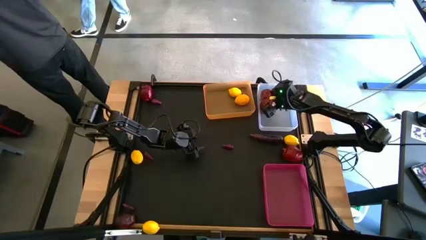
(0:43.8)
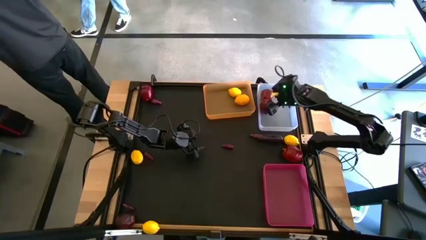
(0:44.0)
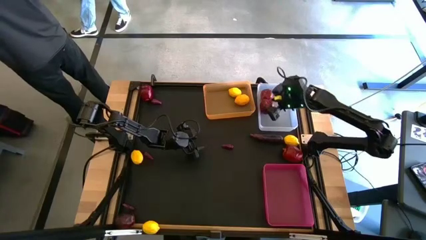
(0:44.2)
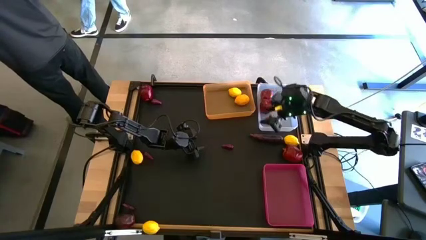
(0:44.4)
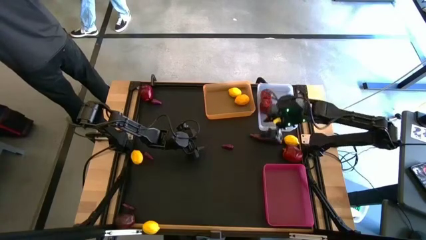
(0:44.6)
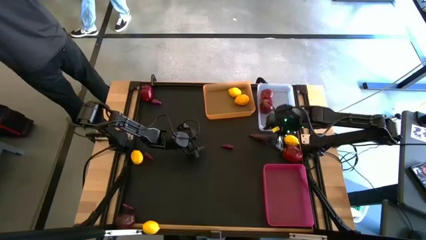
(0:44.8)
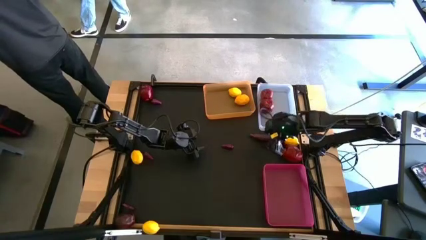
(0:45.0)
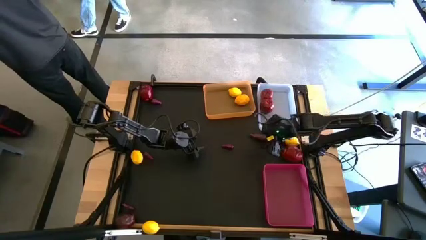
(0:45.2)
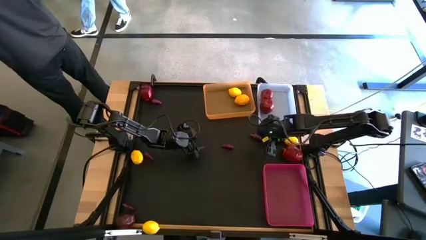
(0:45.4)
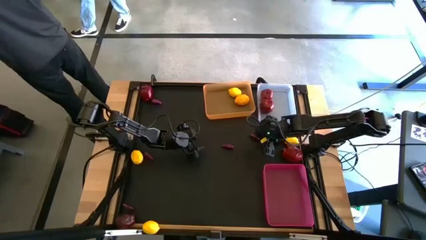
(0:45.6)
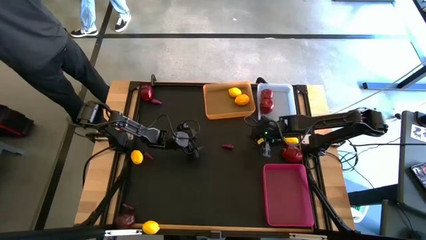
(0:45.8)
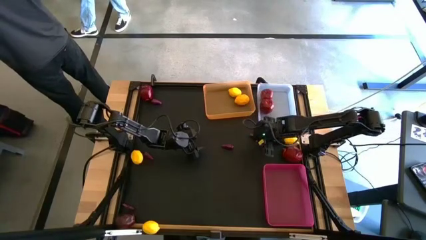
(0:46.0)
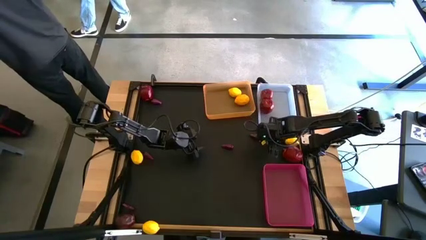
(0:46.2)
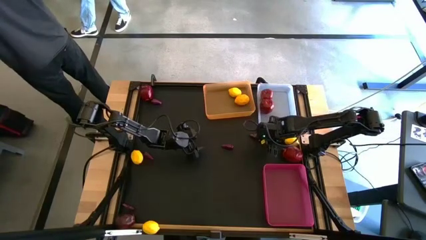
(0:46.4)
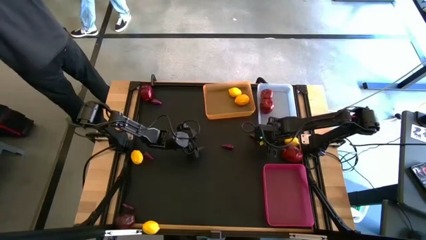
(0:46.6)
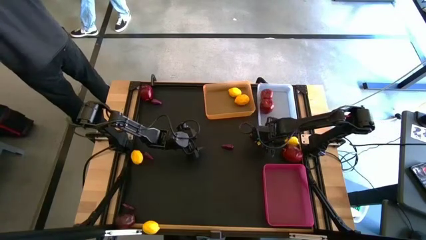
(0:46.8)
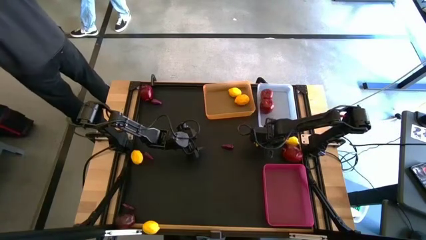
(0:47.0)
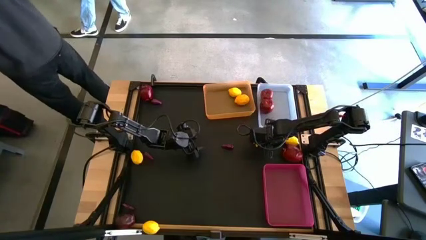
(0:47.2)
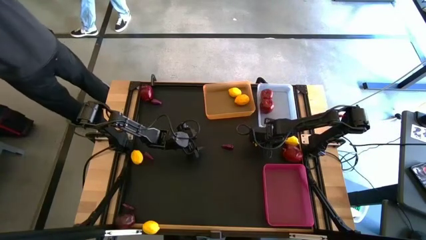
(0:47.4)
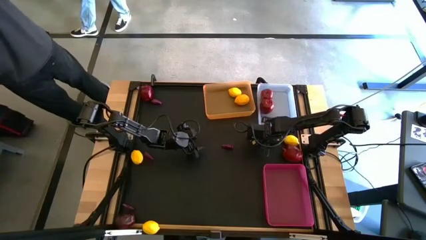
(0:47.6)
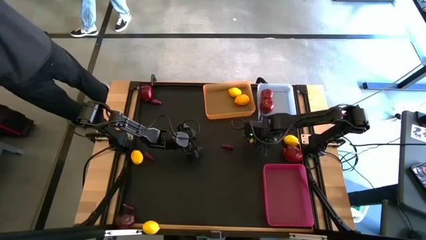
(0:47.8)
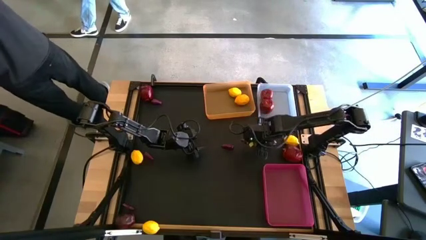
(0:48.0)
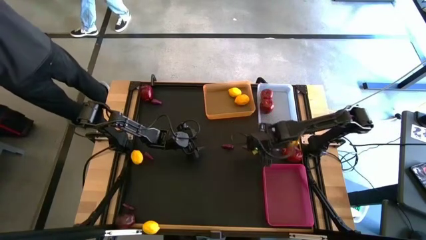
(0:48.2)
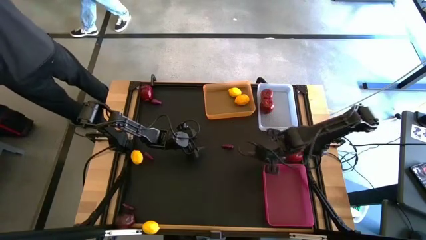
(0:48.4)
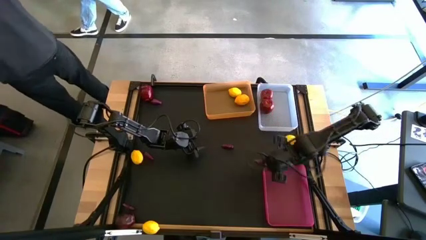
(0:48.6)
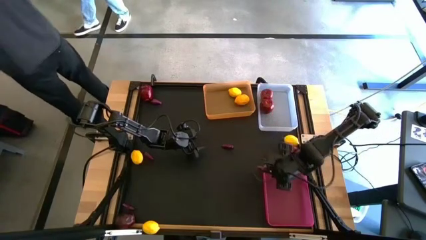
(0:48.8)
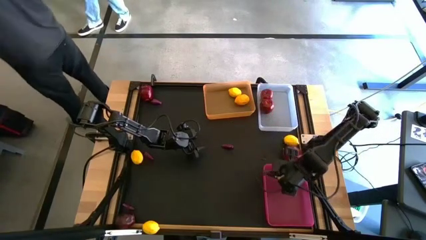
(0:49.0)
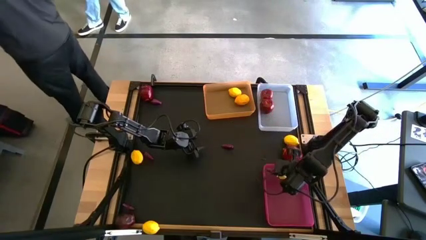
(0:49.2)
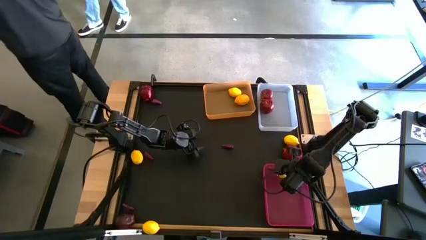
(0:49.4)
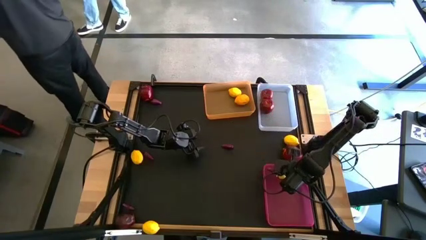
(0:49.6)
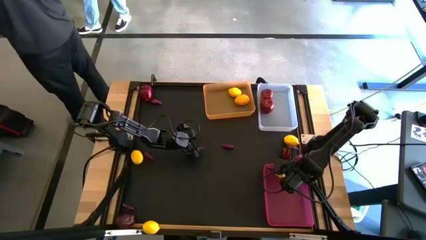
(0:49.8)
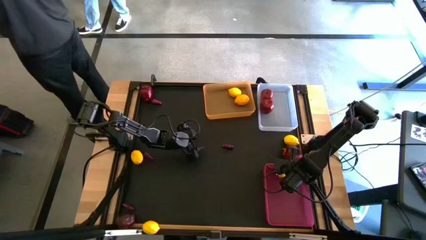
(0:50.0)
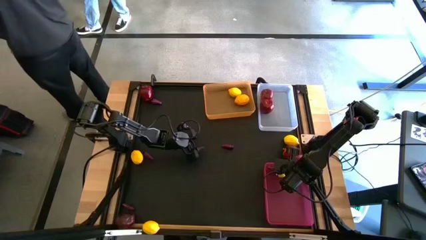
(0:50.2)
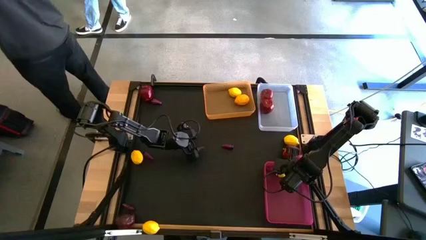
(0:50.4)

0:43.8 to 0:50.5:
Task: Sort produce into baskets
Put the violet eggplant into the pink bin

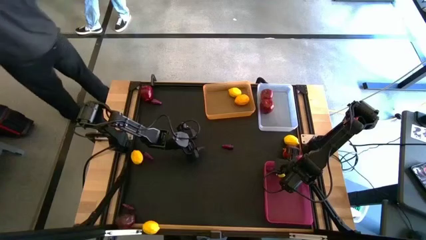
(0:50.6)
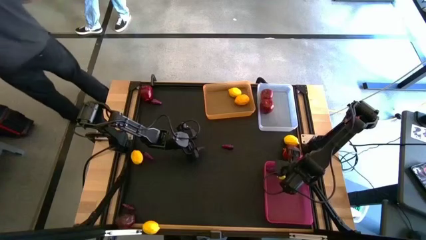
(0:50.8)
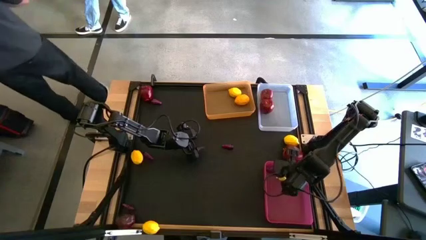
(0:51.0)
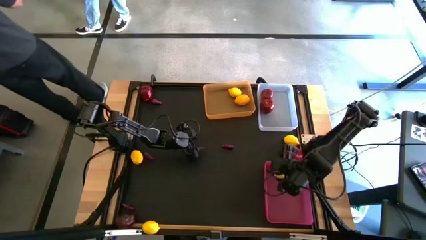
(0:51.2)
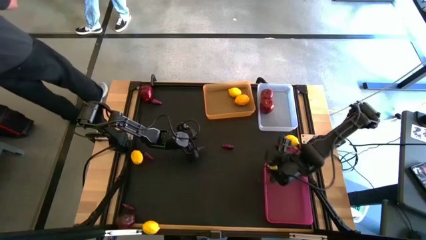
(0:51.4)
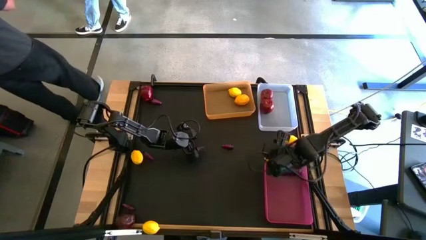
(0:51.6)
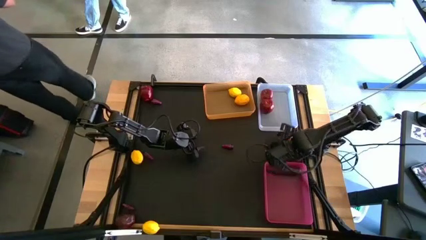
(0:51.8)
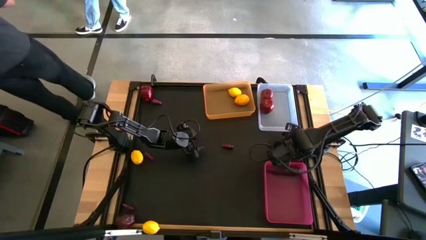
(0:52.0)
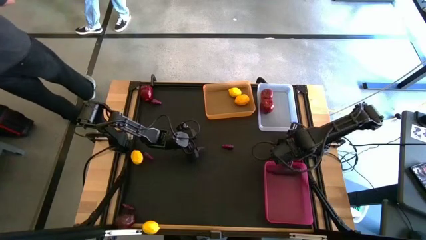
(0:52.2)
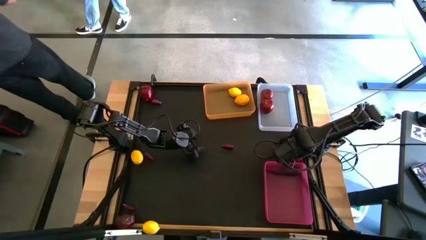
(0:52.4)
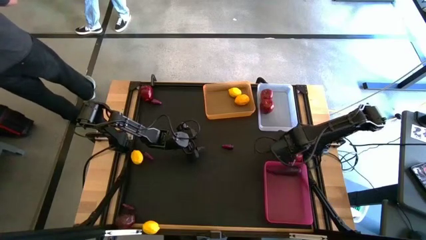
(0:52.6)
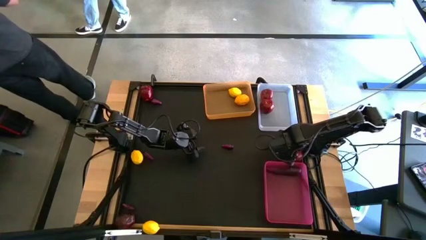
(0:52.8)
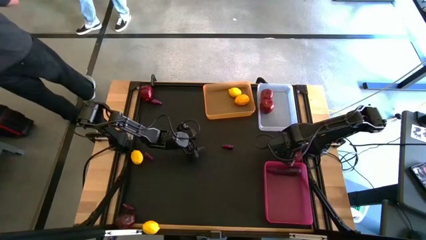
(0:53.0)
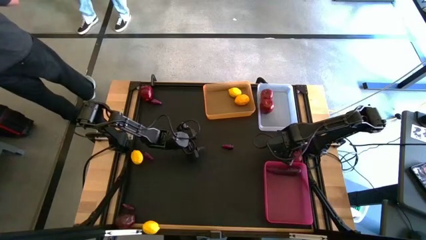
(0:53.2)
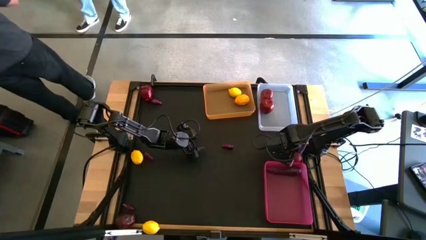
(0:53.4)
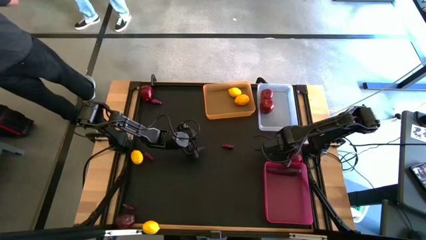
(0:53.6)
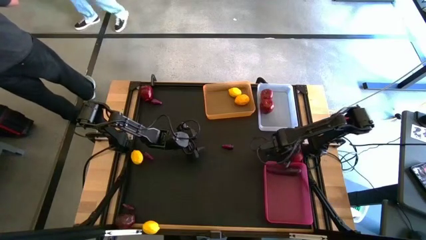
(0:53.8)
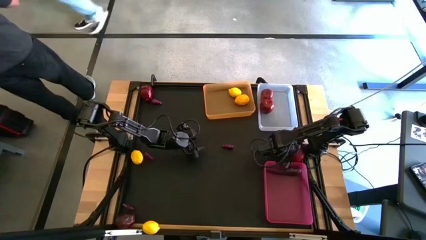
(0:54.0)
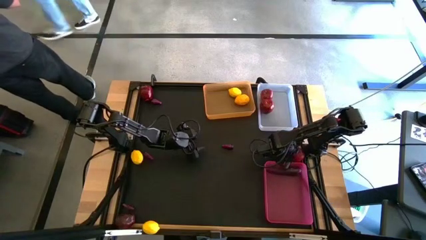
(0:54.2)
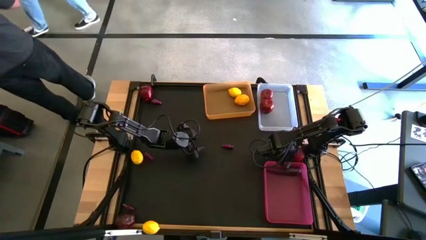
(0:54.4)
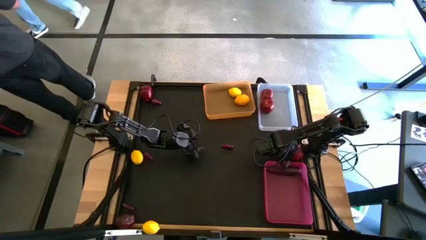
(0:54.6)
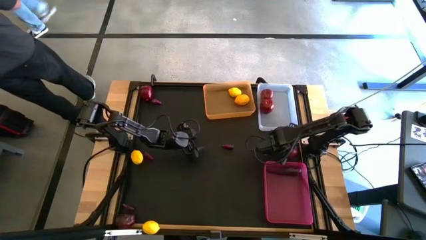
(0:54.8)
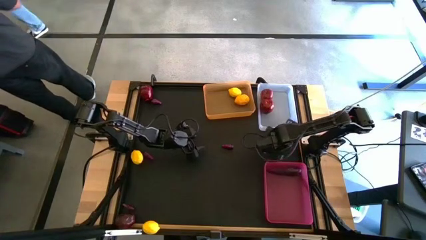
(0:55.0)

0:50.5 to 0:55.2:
Put the red apple into the white bin

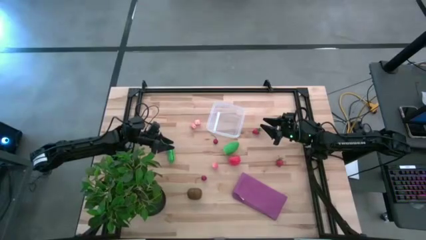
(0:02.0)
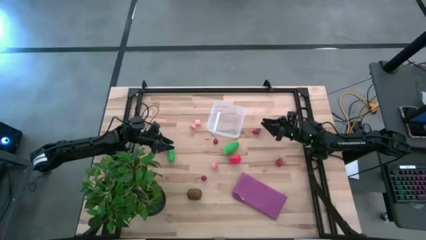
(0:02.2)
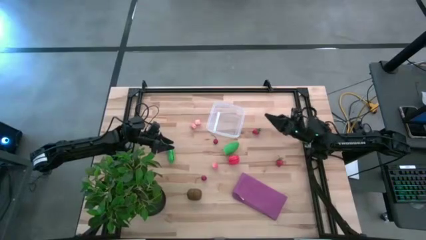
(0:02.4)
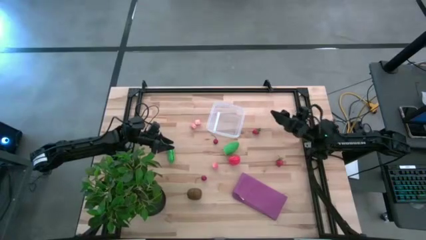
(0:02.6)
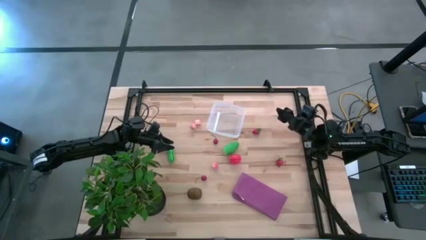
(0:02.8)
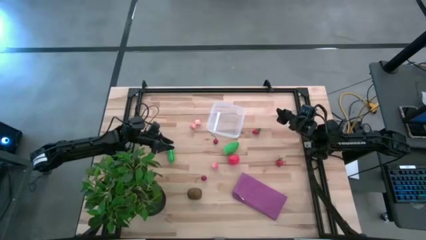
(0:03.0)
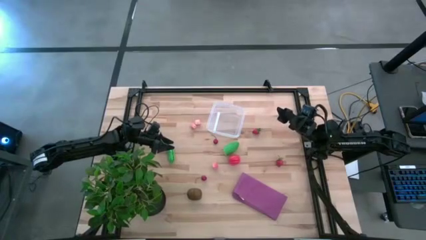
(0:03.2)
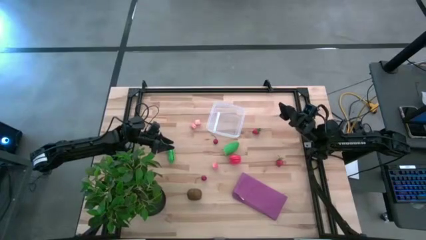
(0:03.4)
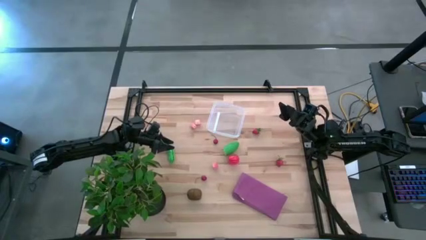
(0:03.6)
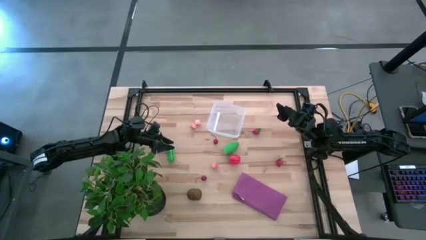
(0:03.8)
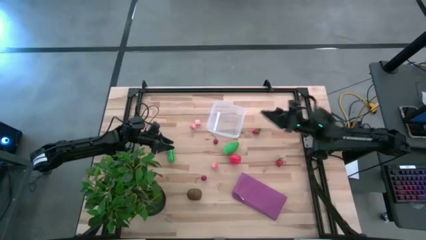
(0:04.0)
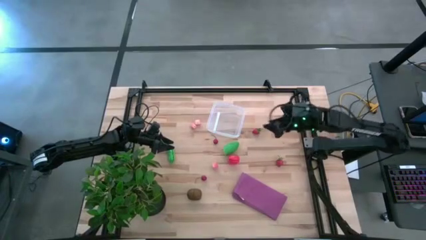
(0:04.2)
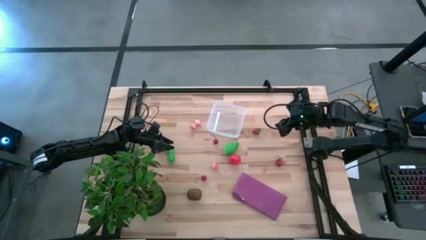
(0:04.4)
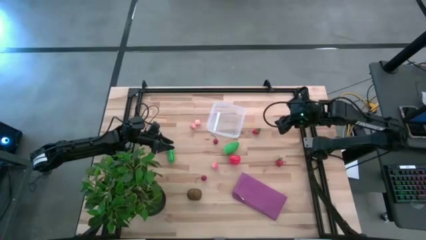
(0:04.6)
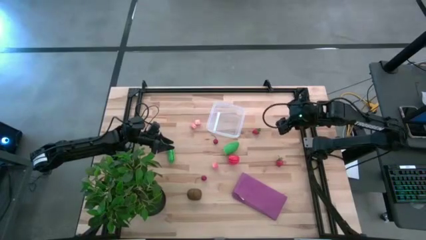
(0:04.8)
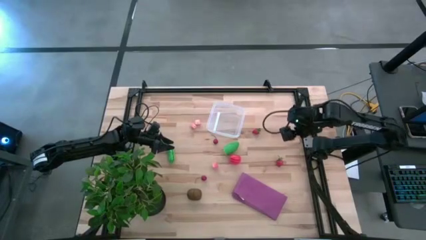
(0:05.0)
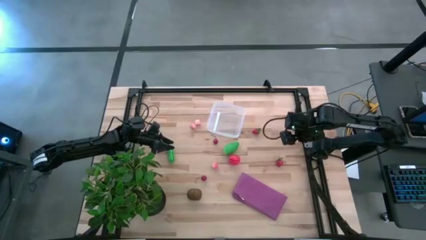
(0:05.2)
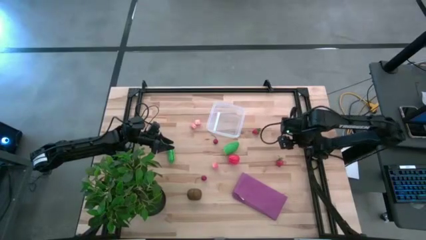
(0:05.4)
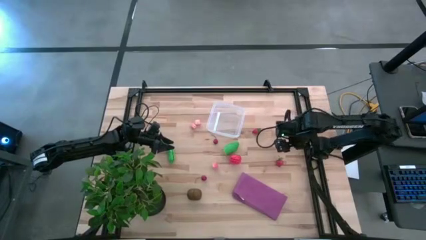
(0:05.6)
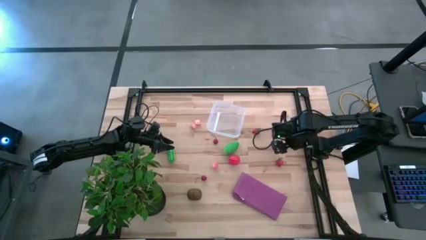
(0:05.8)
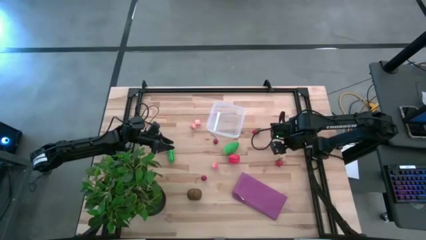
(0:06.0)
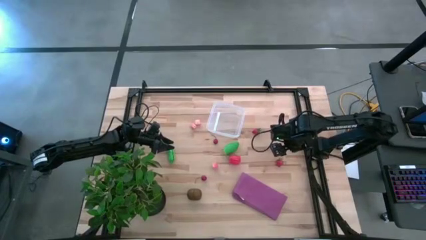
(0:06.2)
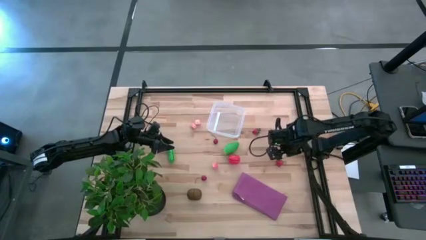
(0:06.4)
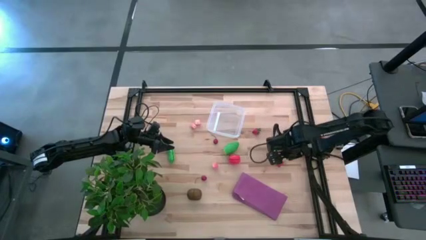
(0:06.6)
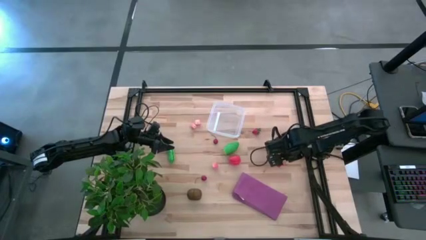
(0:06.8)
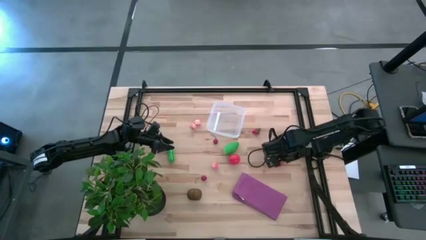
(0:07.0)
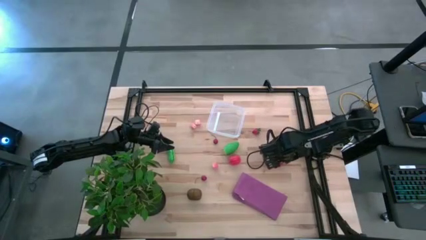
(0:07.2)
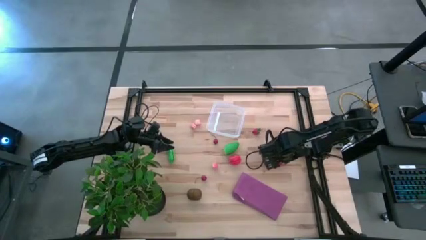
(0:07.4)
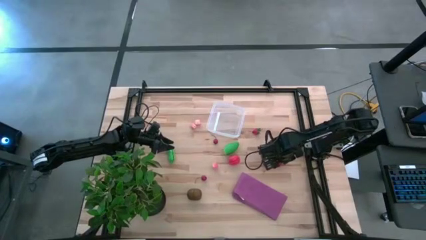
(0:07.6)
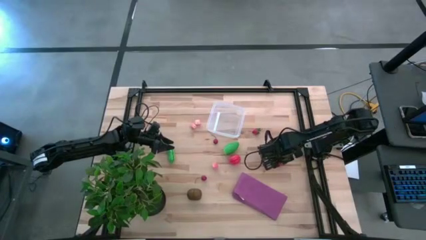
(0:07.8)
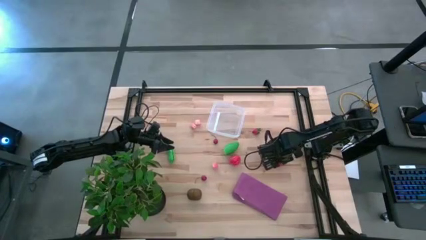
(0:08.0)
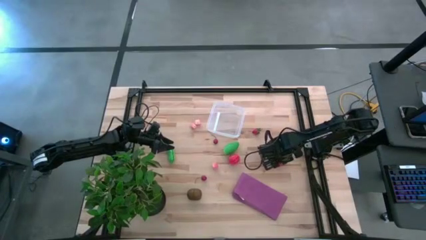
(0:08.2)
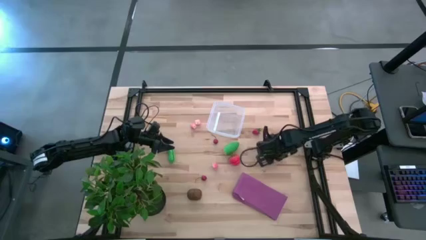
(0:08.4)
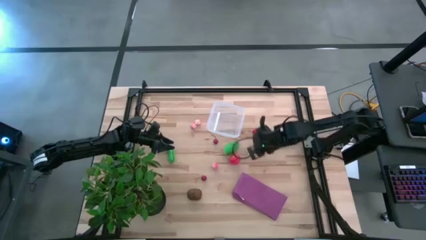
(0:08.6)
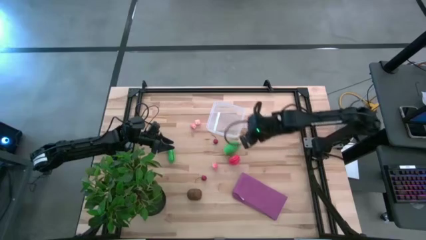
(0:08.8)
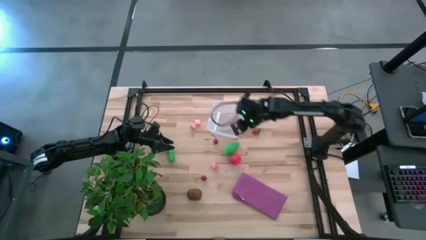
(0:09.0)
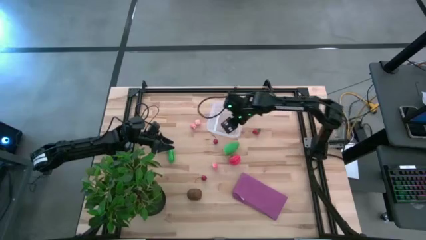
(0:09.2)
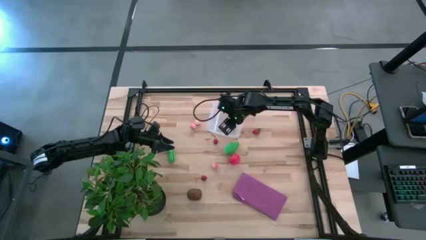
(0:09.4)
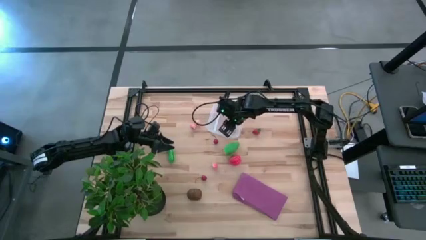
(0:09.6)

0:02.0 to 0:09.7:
Task: Pick and placing Produce into tupperware
Put the bottom strawberry in the transparent bin
